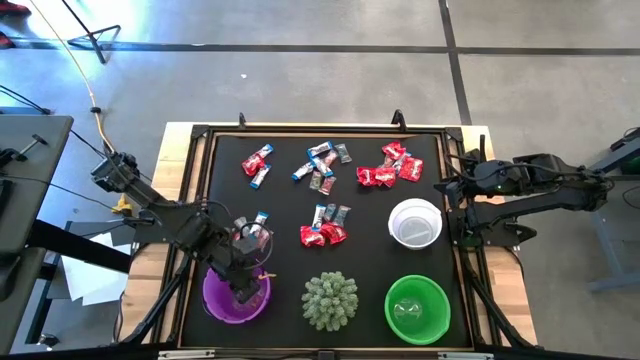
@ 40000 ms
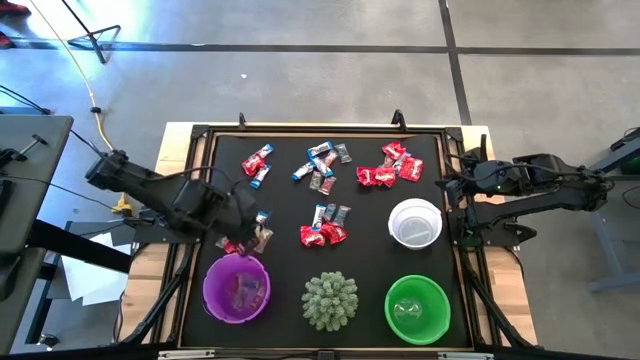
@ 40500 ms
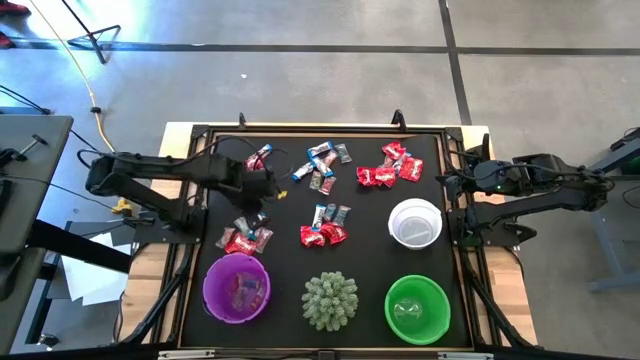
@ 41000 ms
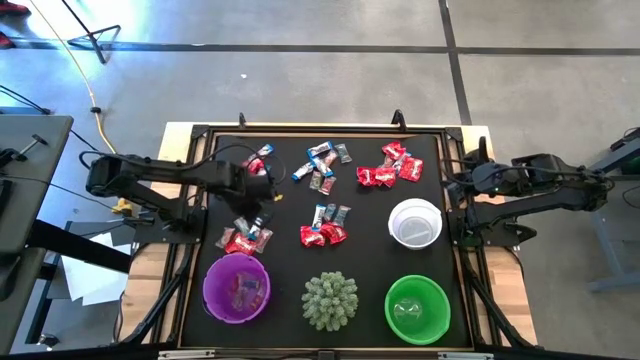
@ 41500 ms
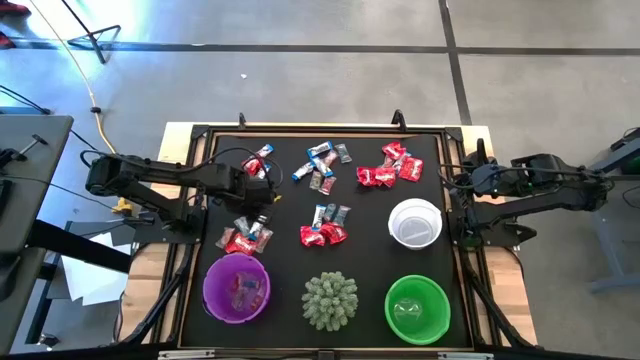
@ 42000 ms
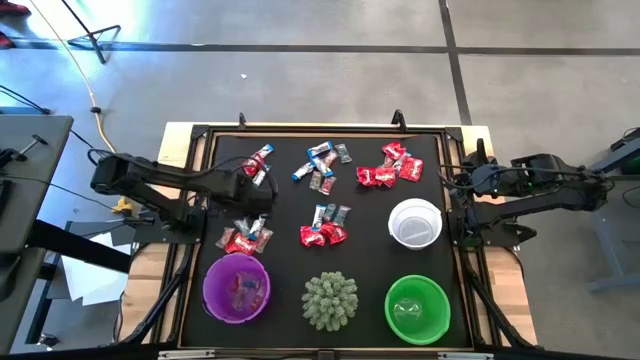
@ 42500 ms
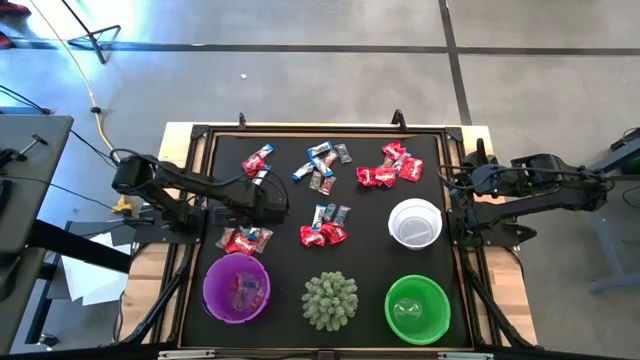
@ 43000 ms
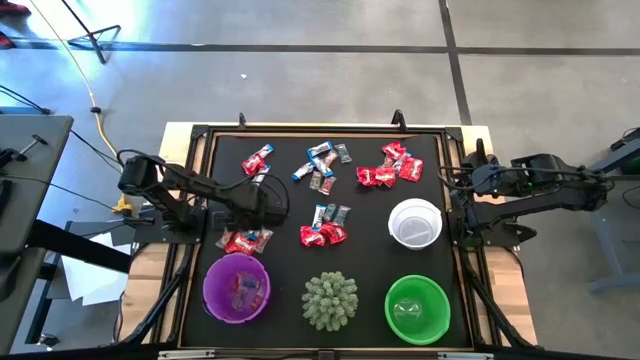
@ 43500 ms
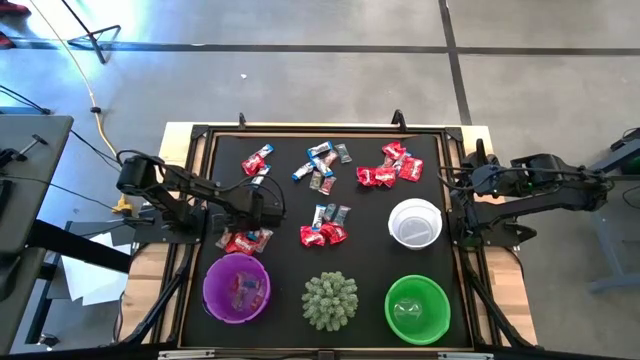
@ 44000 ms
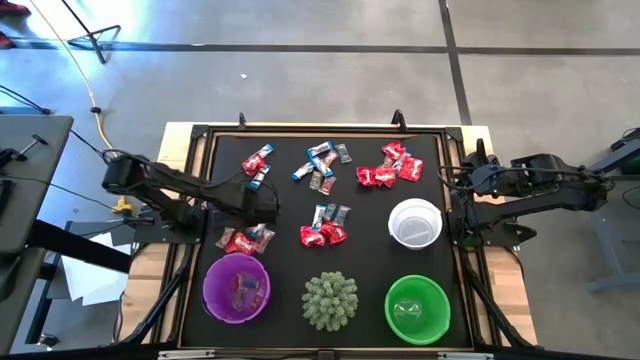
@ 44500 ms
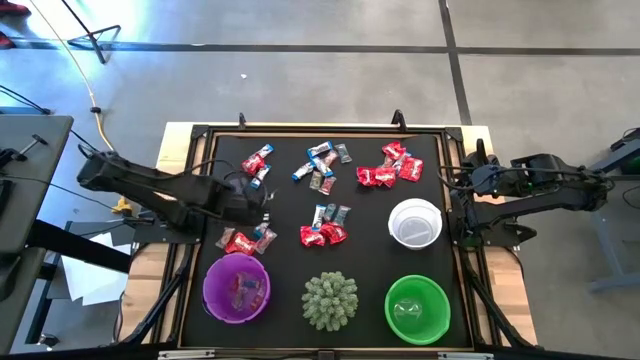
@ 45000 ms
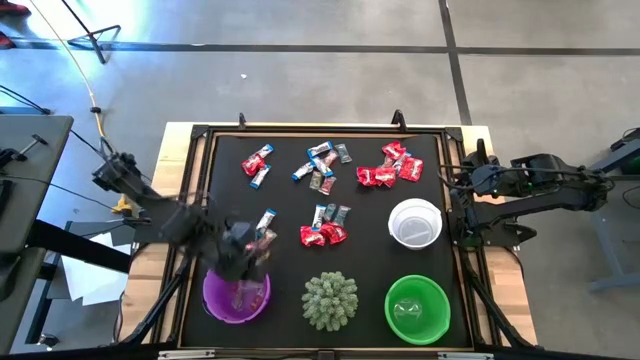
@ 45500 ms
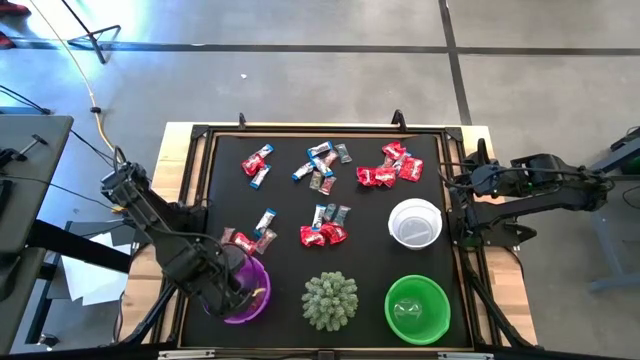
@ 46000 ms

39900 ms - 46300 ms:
Task: Sort candy
Put the transparent candy wrapper into the purple bucket

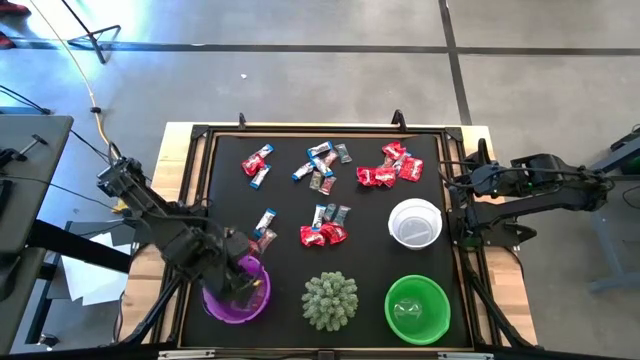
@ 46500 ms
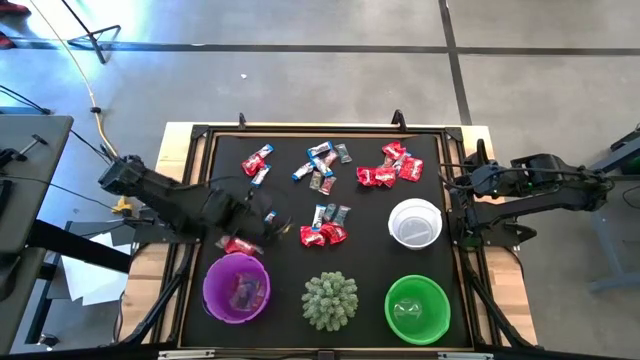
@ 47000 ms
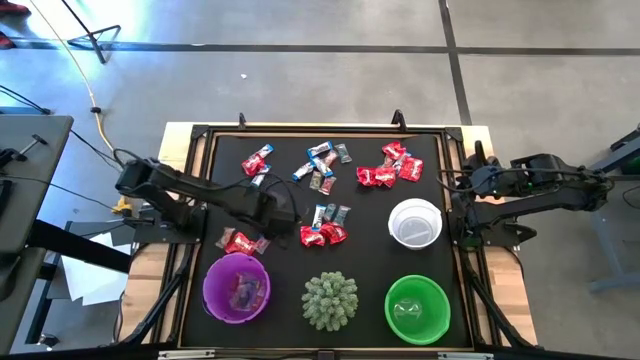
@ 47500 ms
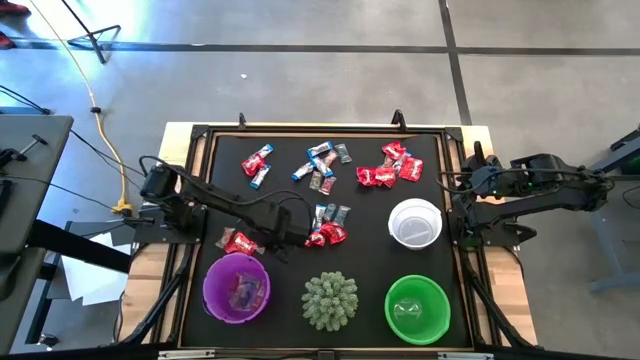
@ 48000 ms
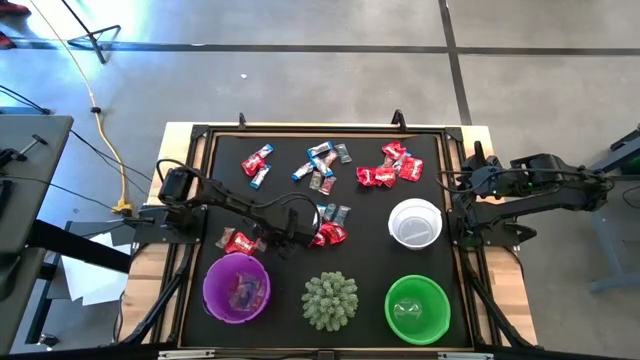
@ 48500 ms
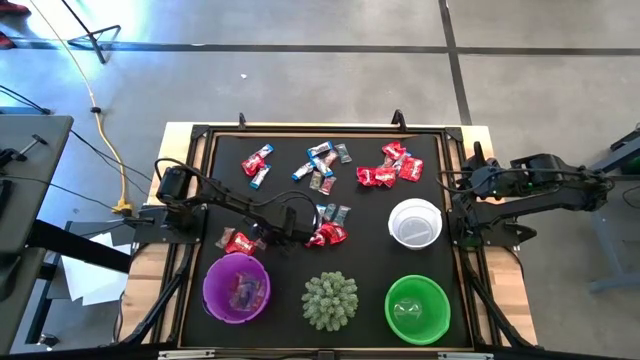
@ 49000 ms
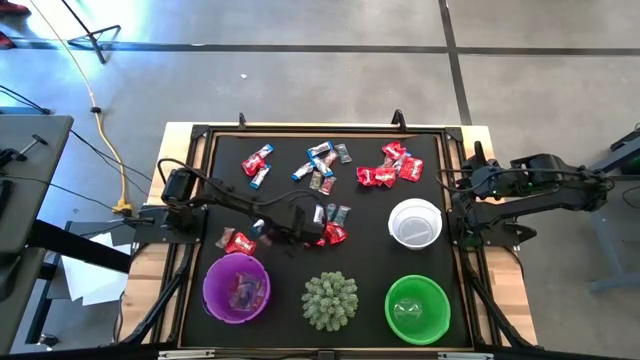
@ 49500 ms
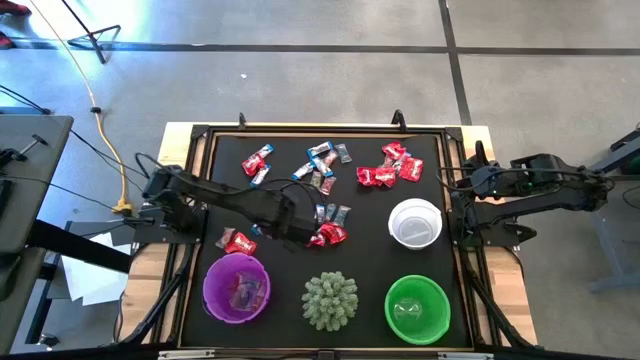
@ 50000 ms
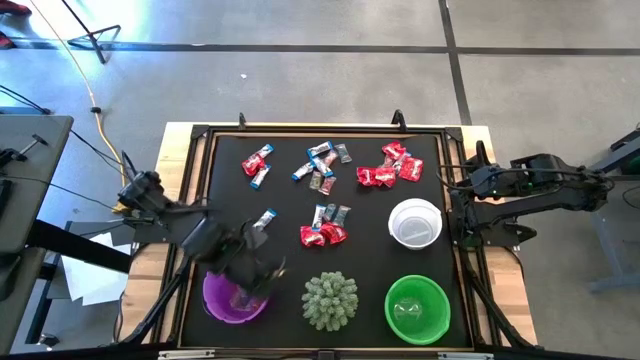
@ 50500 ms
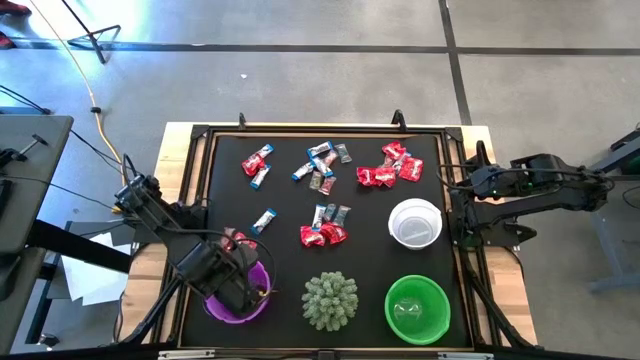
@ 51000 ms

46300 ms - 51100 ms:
Put the transparent candy wrapper into the purple bucket

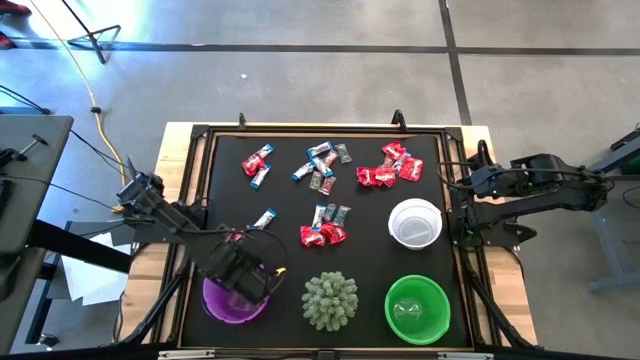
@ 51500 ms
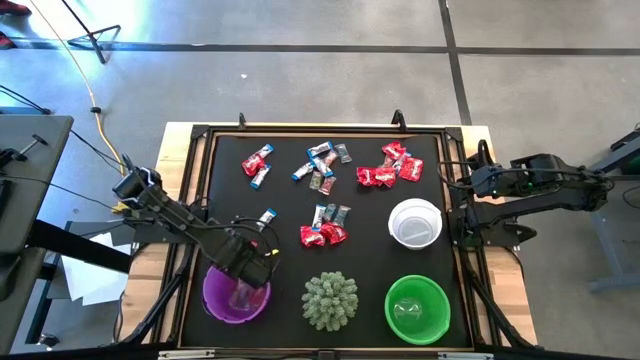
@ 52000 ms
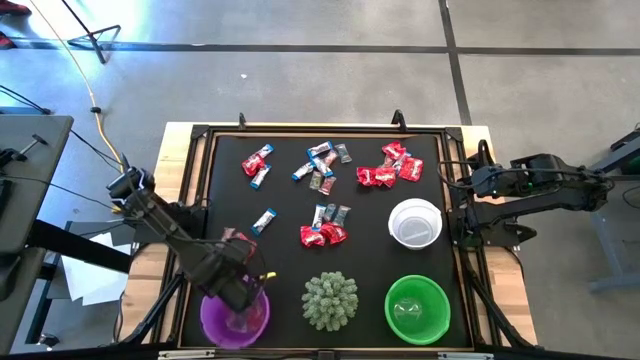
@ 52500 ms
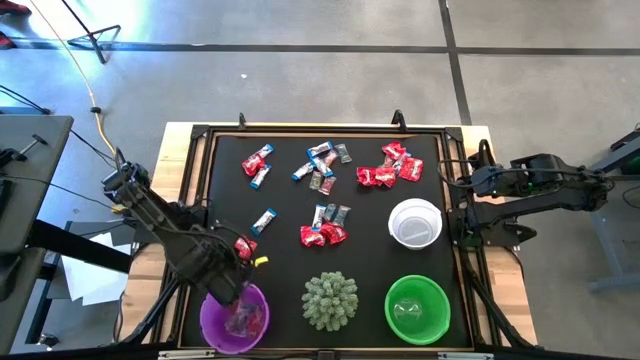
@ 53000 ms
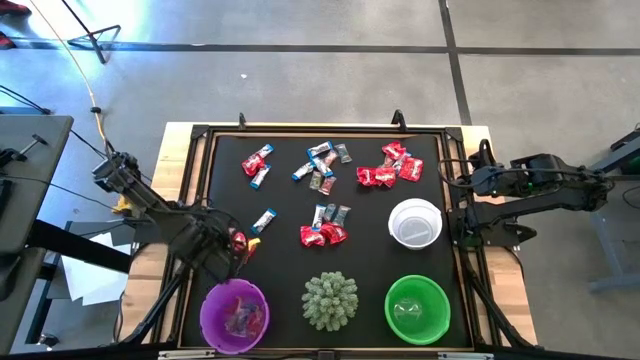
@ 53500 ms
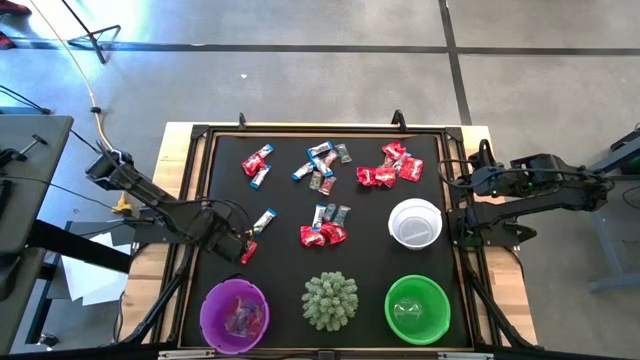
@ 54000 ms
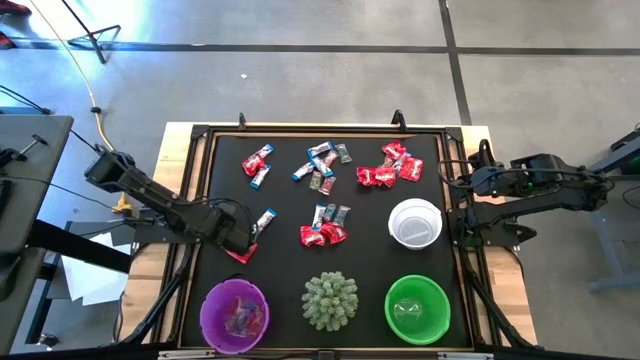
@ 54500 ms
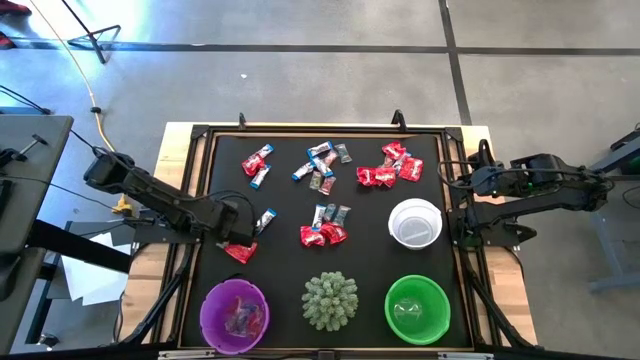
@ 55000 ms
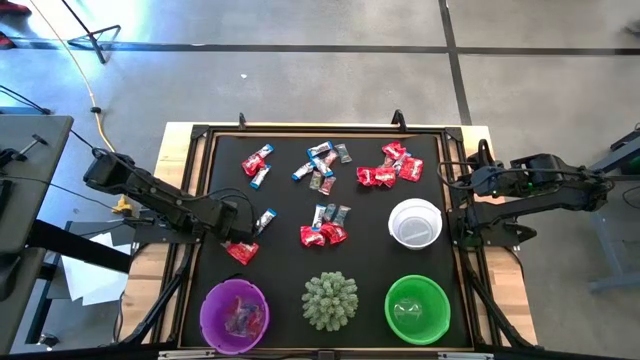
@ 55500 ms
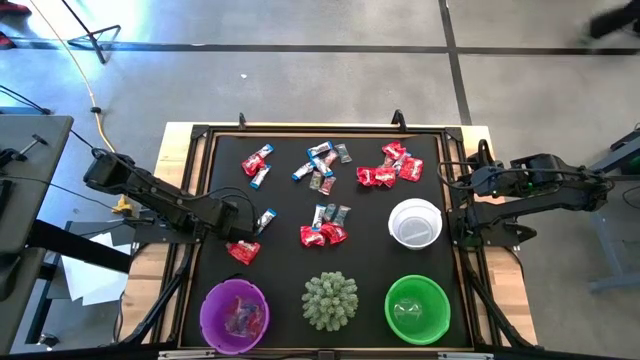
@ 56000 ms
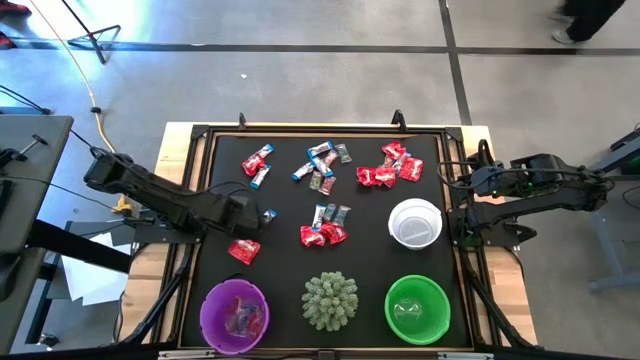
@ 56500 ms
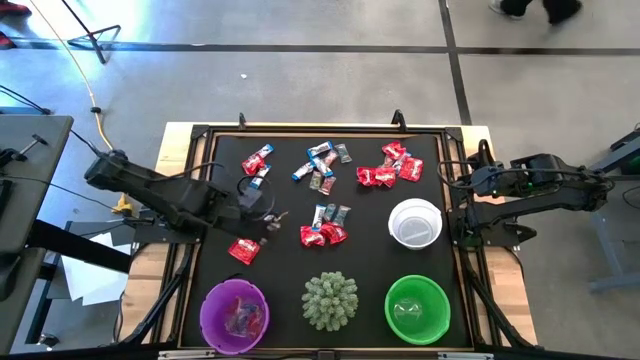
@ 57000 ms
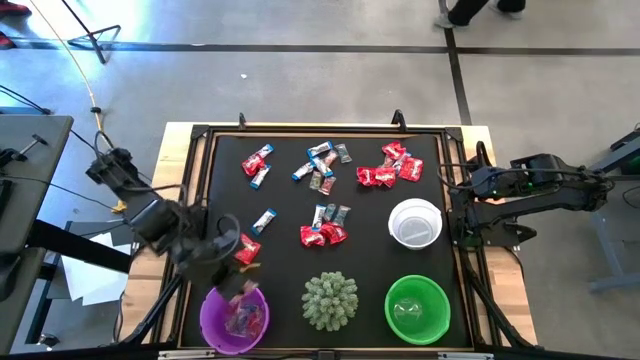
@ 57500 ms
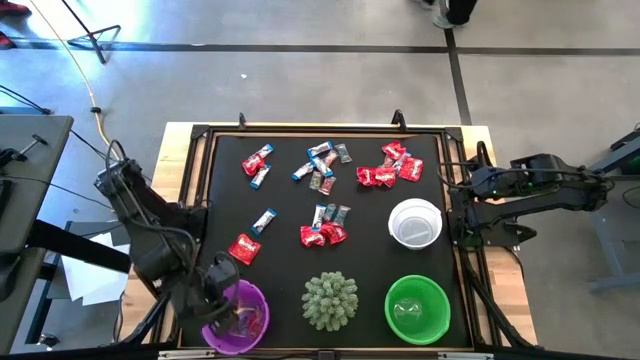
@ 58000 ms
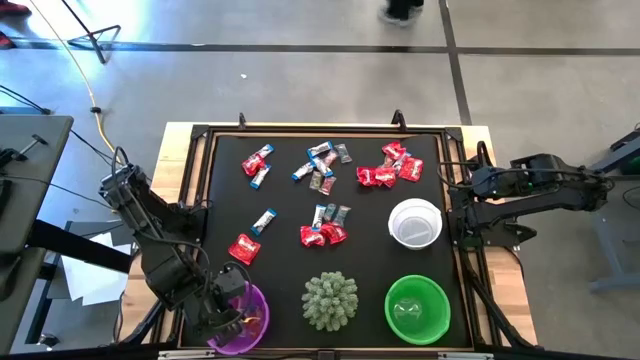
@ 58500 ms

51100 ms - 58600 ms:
Put the transparent candy wrapper into the purple bucket
